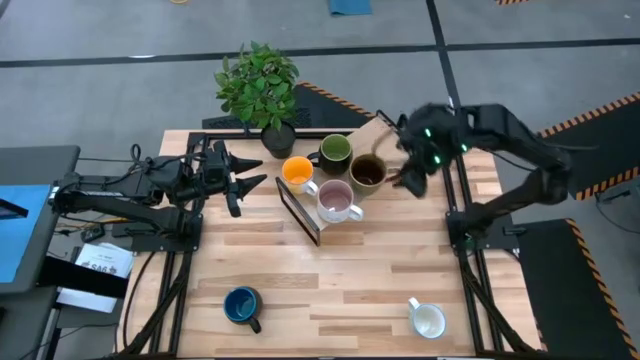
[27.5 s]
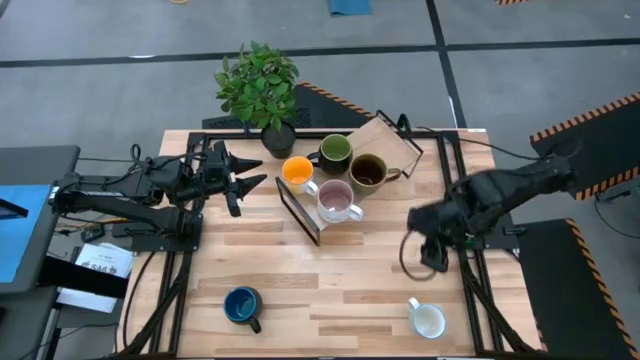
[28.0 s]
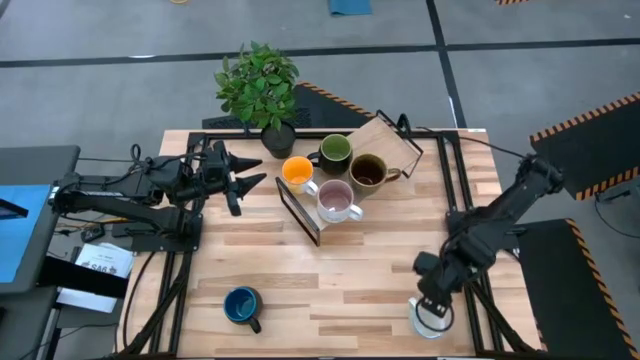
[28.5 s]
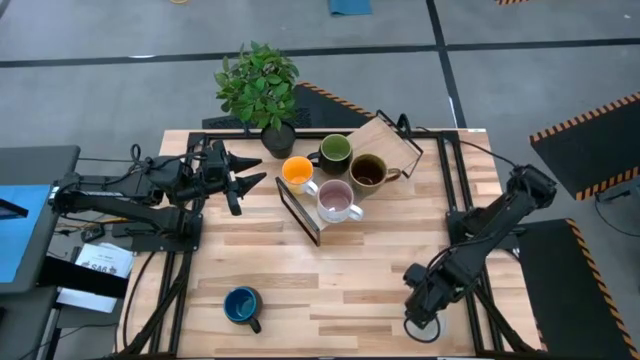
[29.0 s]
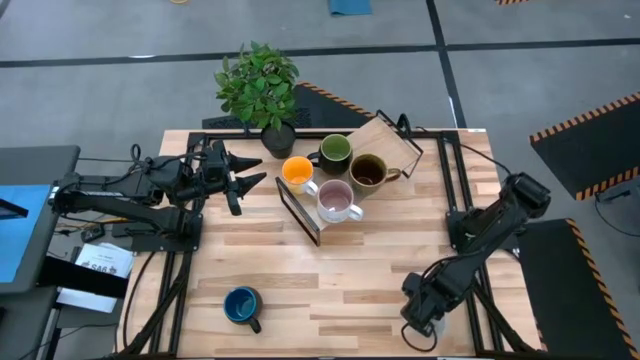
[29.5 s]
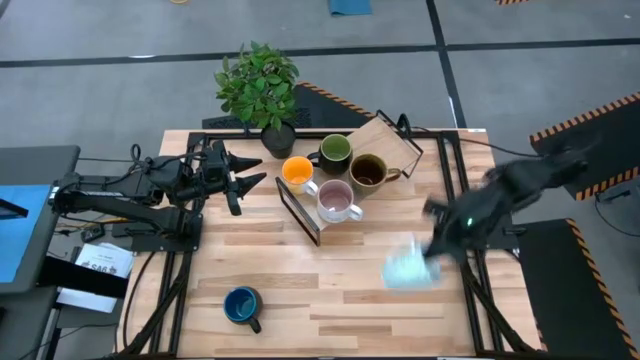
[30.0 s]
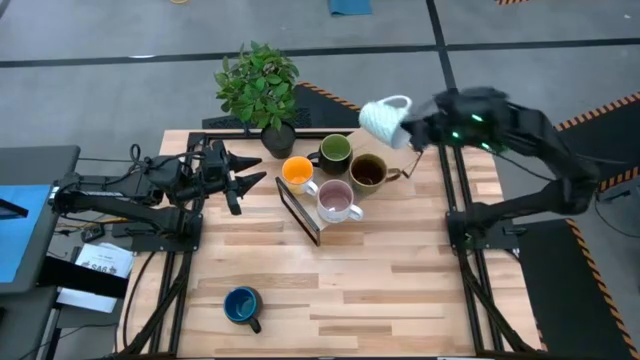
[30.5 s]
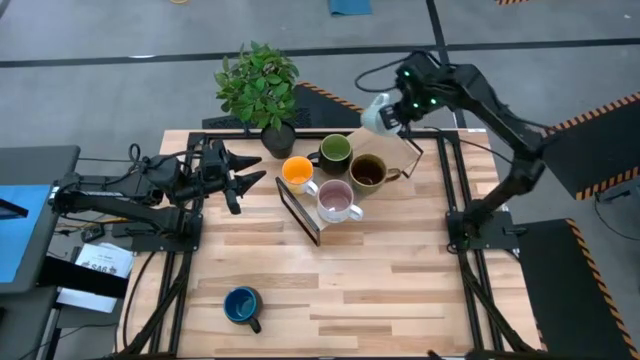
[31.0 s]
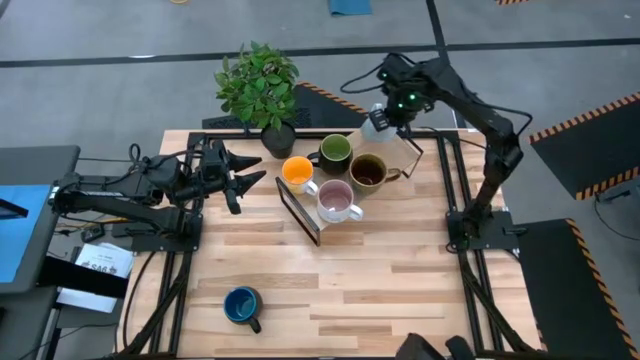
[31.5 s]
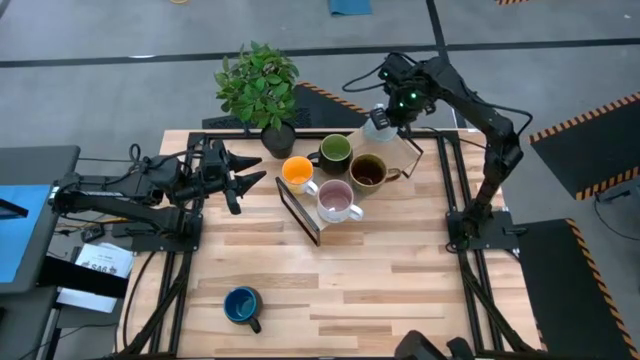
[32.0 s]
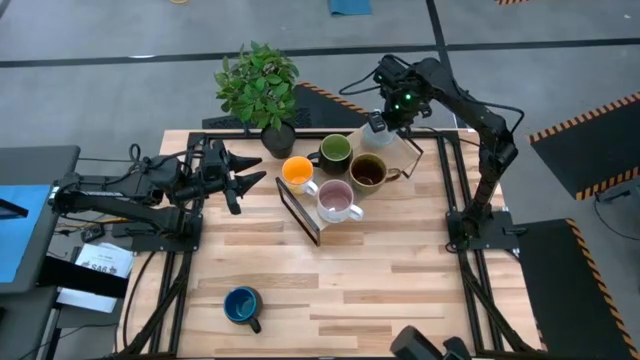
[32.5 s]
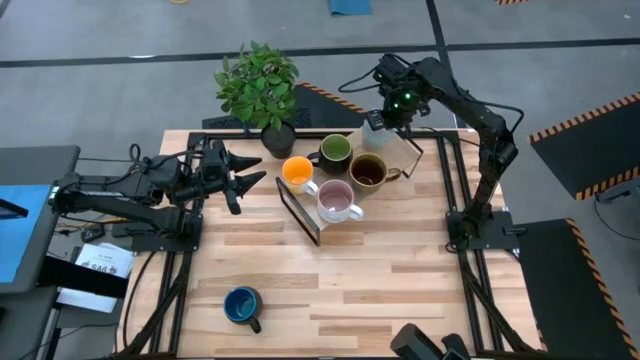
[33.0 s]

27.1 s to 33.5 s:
Task: Place coffee mugs
Put the white mug on the shelf

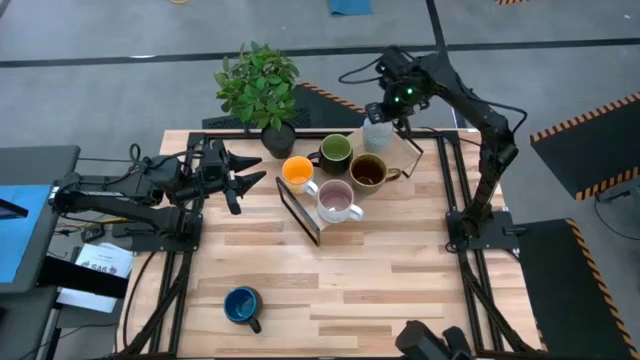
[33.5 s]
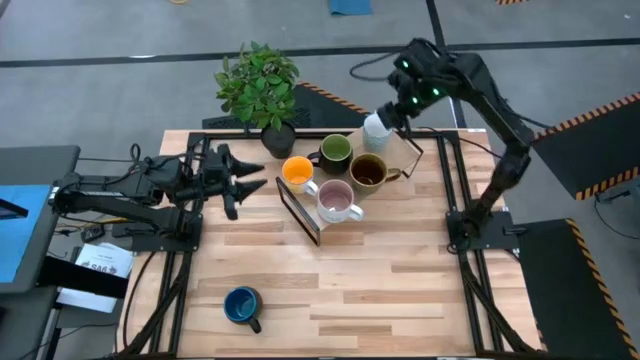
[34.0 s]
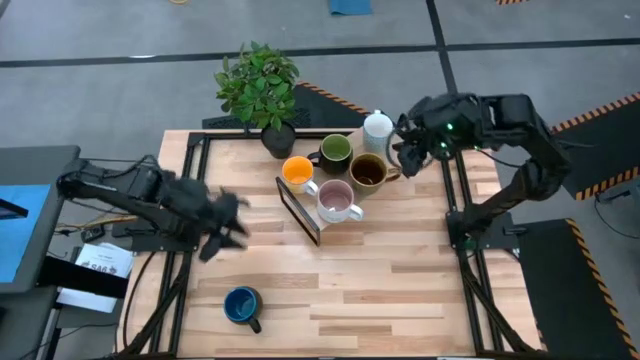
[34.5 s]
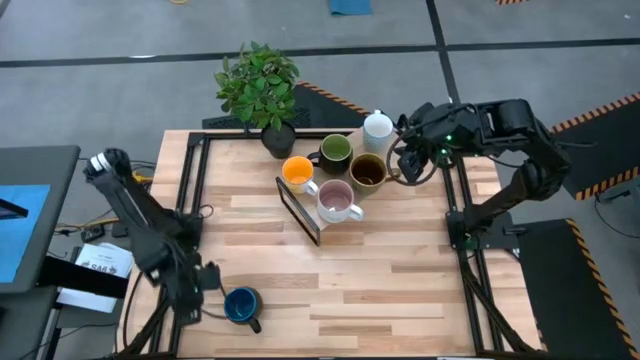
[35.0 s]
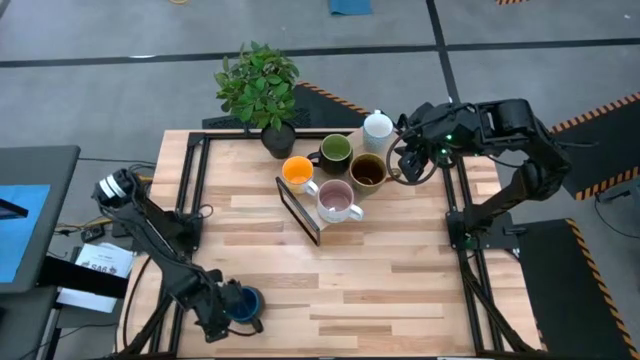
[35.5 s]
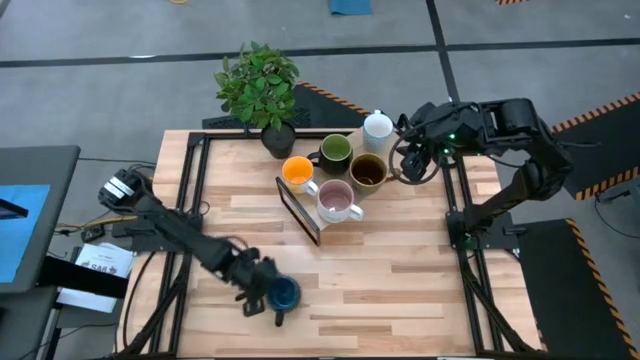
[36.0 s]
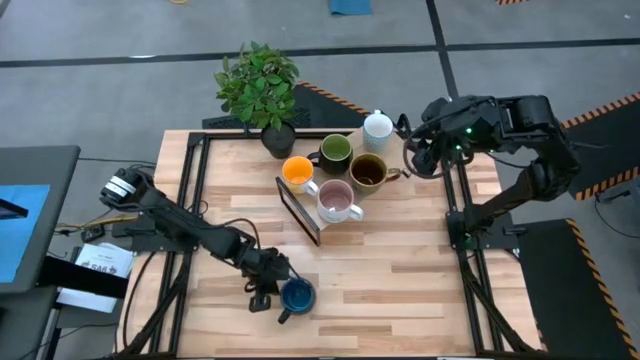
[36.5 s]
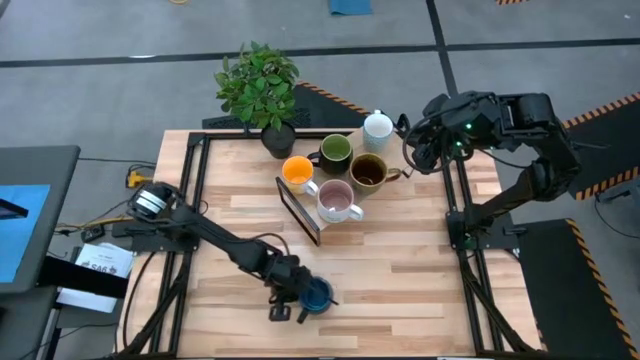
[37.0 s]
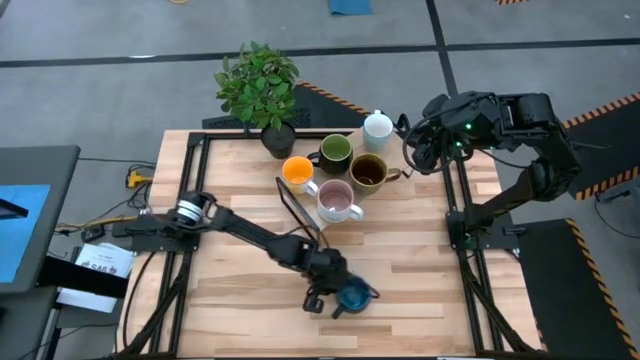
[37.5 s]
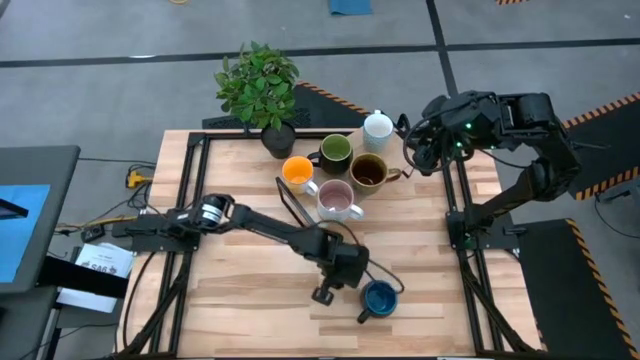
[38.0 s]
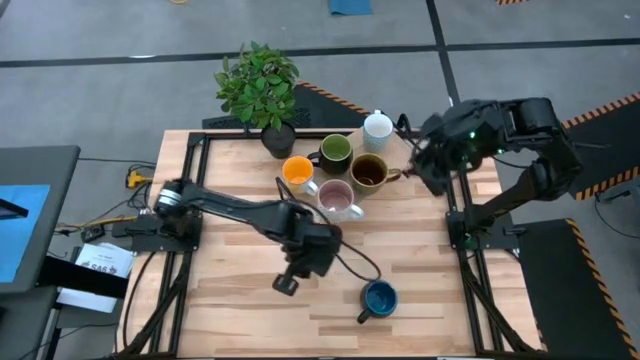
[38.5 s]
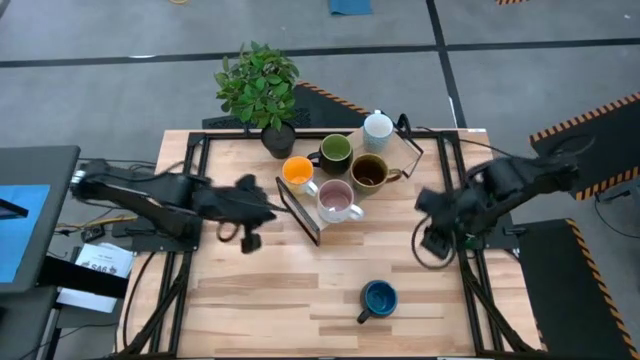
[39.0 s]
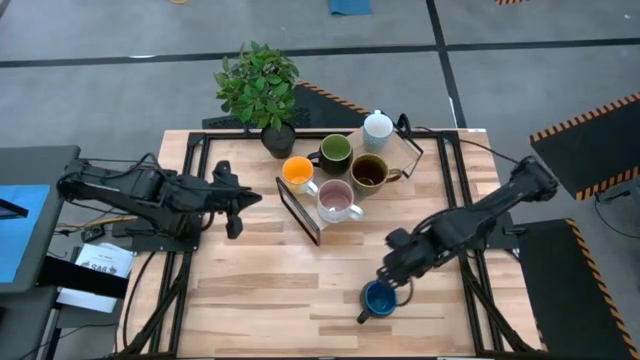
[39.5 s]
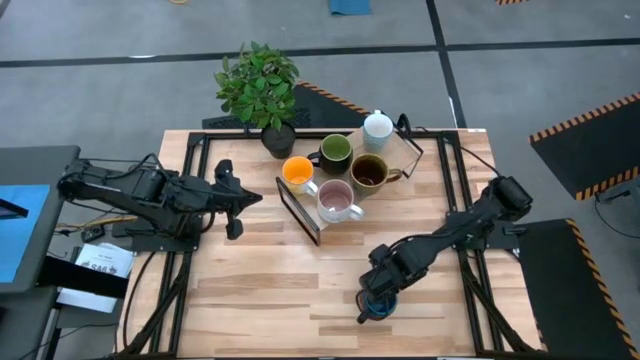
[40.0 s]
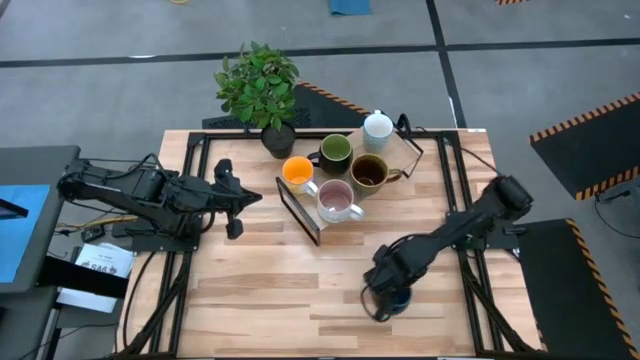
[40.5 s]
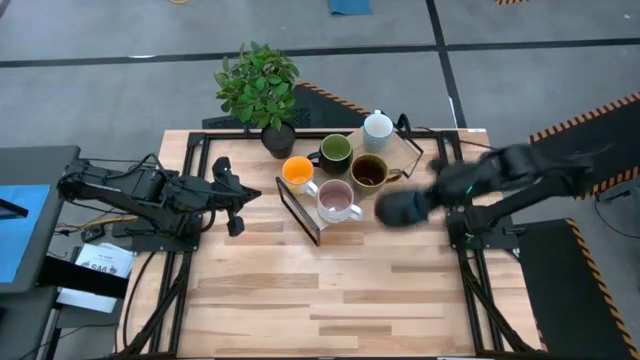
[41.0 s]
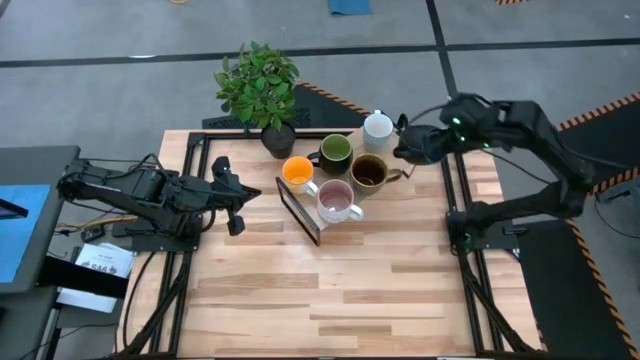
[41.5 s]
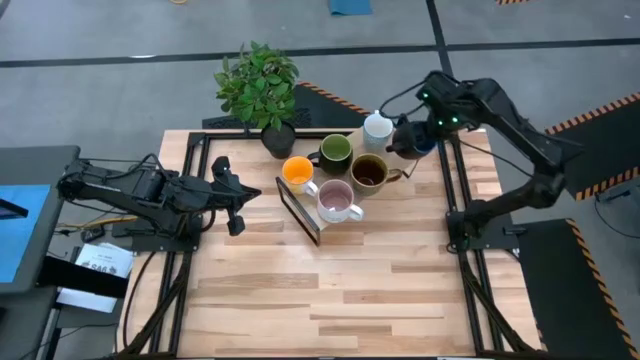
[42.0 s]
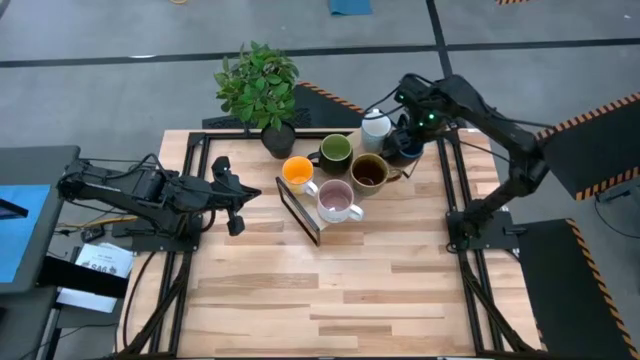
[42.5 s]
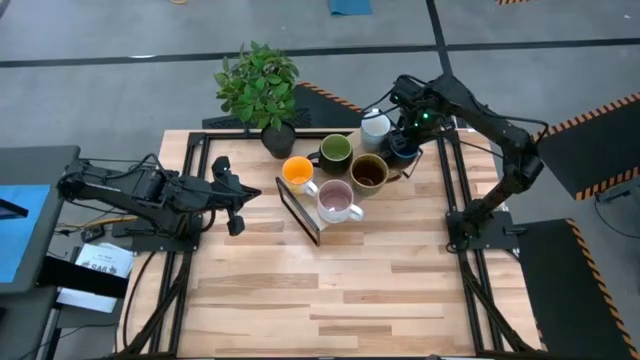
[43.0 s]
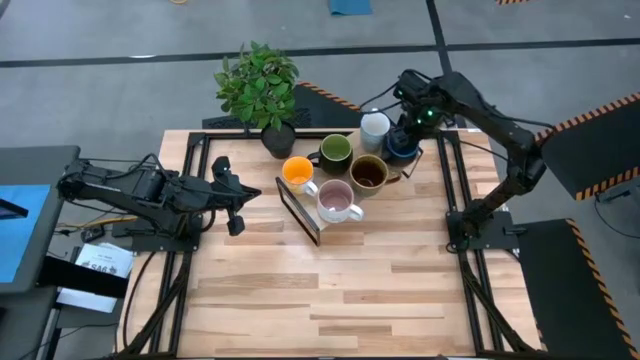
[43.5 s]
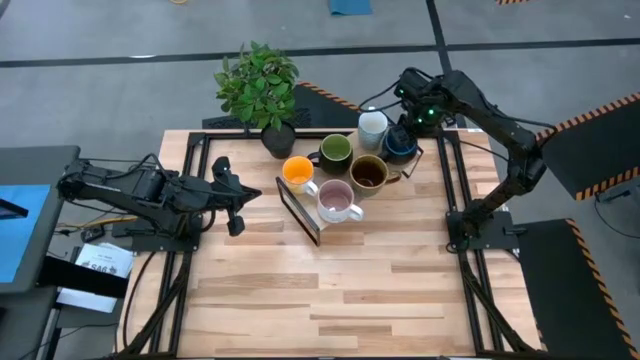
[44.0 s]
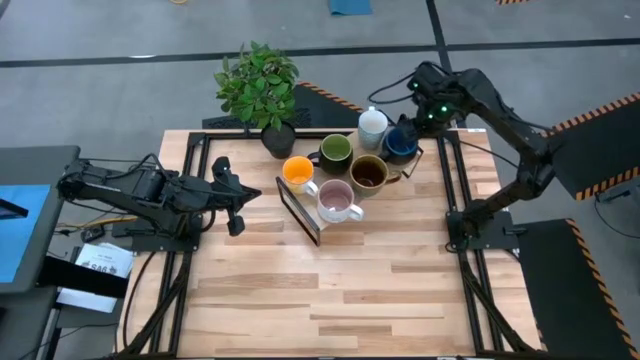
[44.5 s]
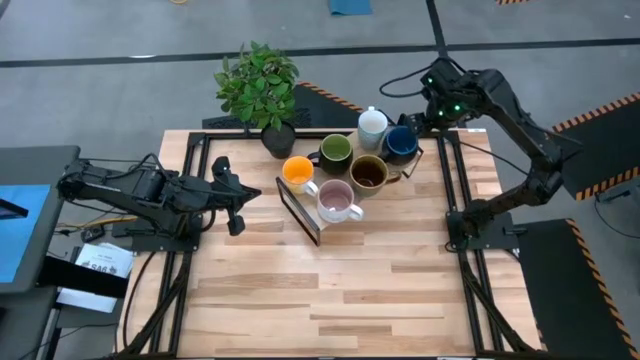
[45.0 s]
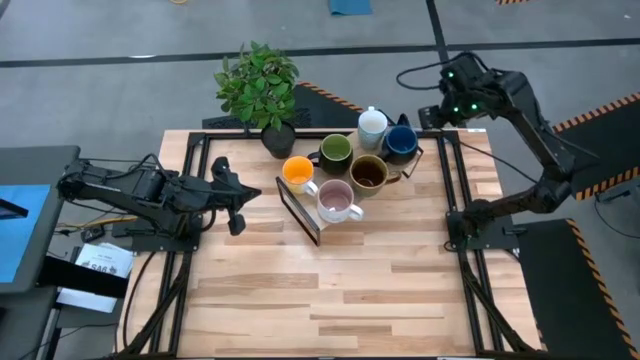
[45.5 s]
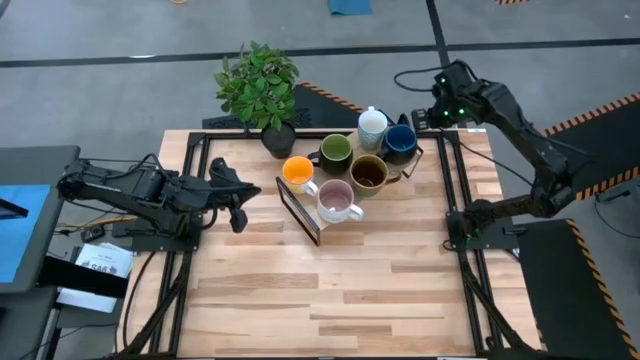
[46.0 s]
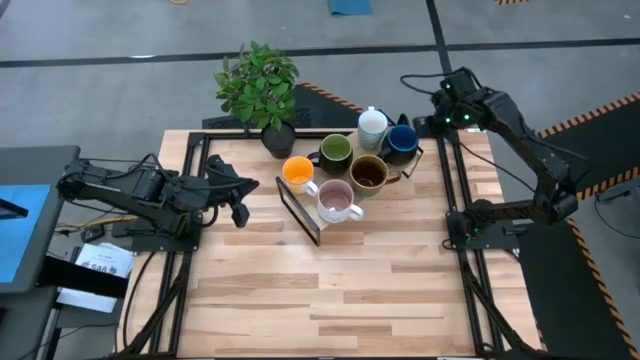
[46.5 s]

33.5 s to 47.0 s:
Put the blue mug on the shelf

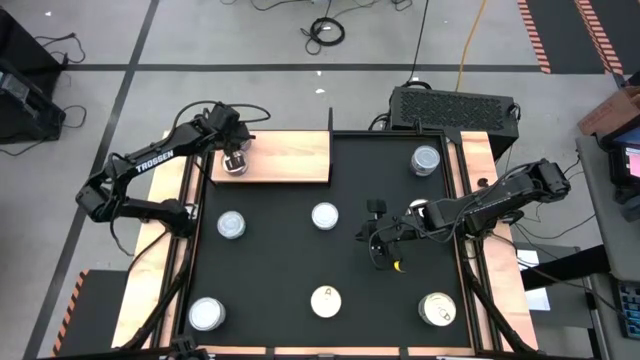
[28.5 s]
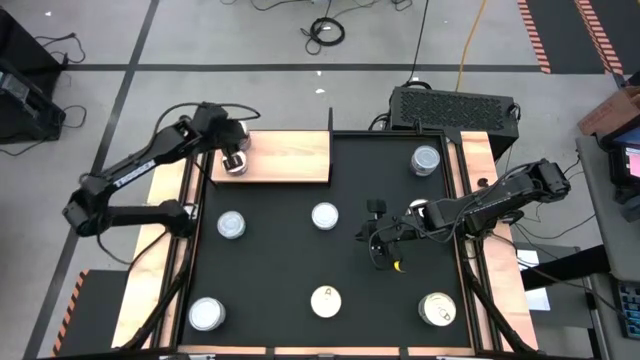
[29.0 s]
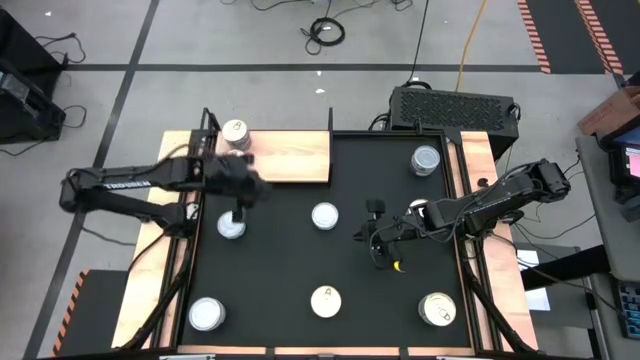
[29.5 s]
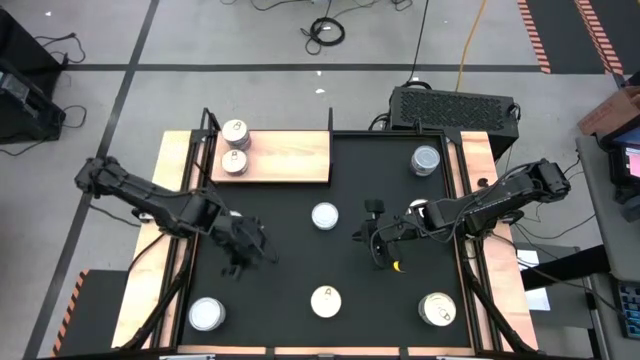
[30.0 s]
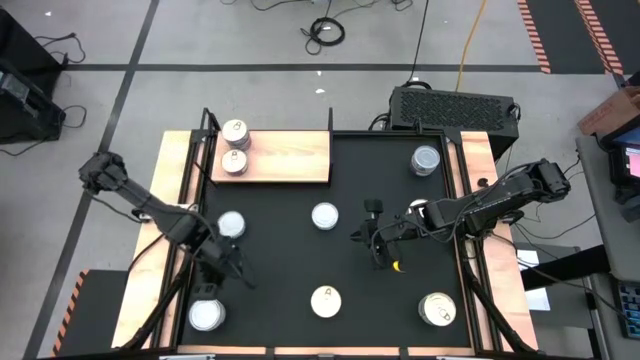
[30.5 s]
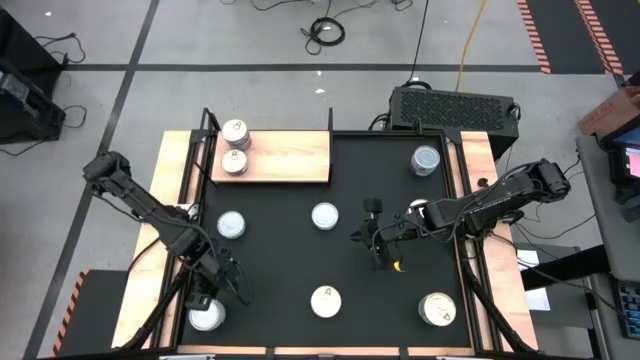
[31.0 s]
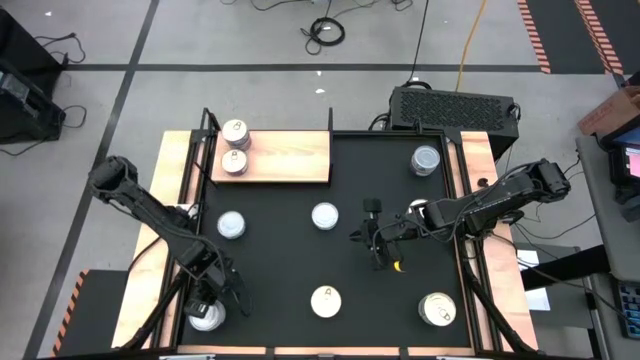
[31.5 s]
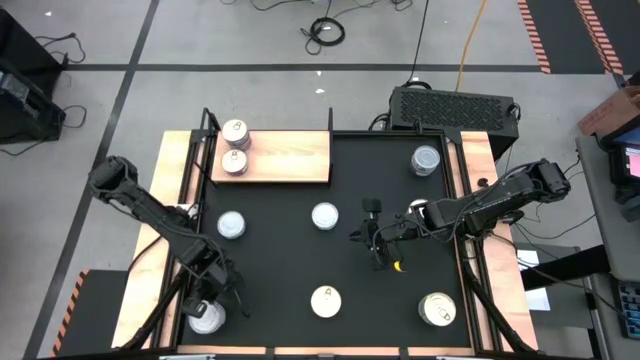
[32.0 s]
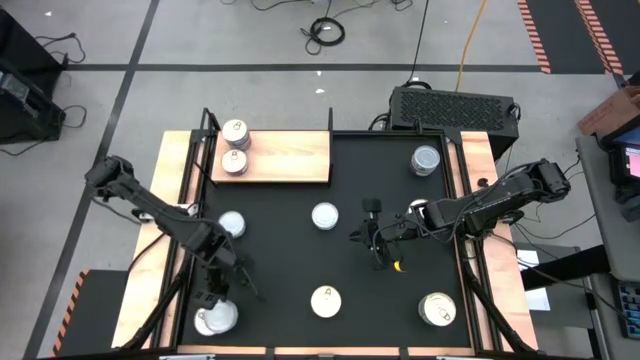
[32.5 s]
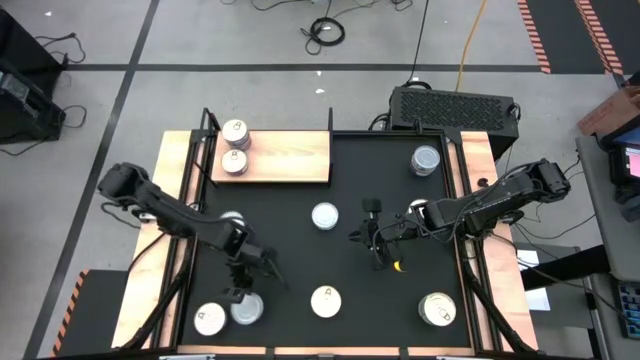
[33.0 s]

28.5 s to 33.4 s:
Task: Stack canned seafood by type on shelf
Remove the green tuna can from the top of the blue tuna can
